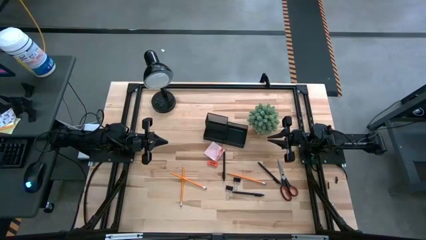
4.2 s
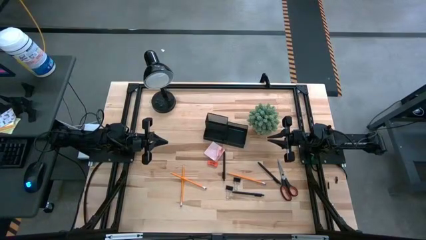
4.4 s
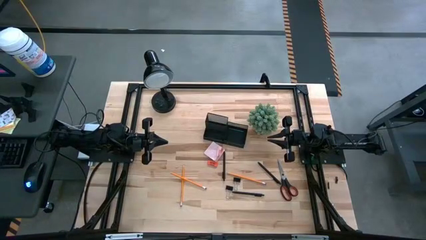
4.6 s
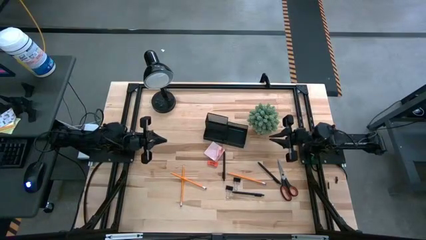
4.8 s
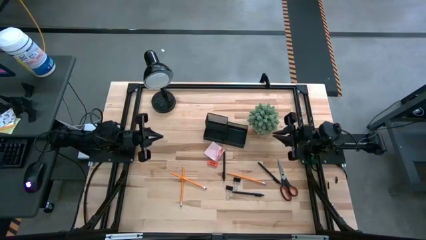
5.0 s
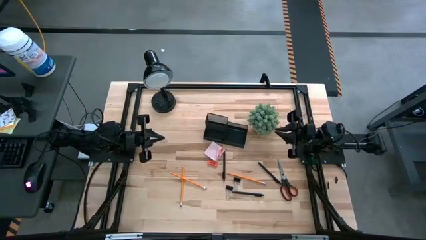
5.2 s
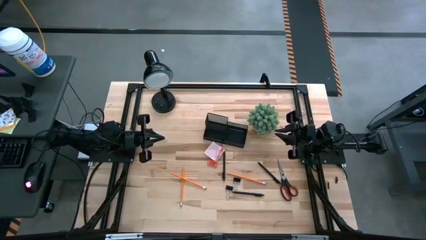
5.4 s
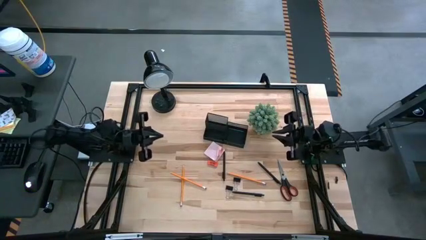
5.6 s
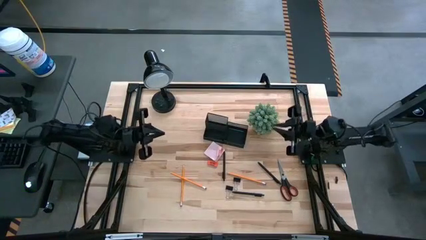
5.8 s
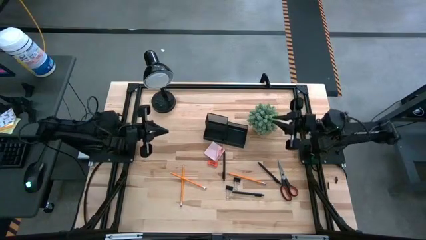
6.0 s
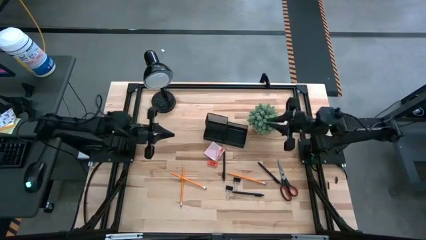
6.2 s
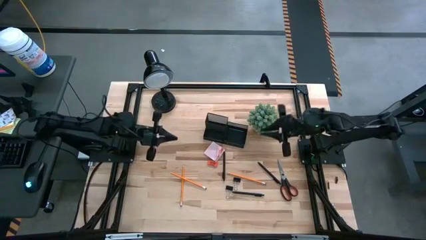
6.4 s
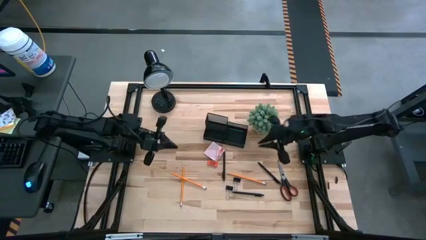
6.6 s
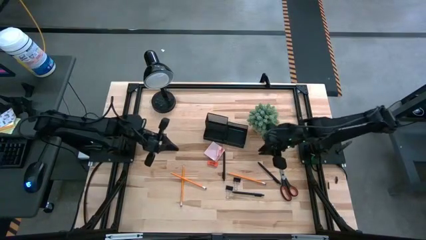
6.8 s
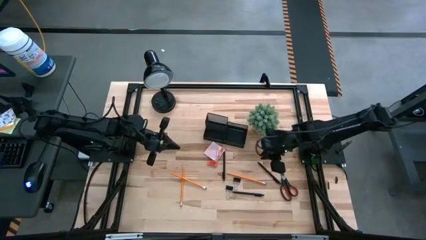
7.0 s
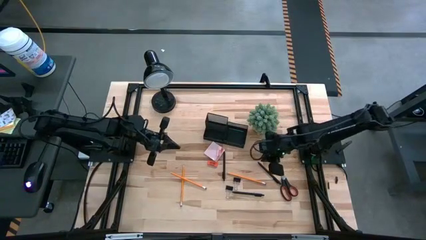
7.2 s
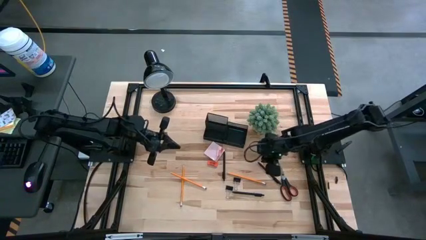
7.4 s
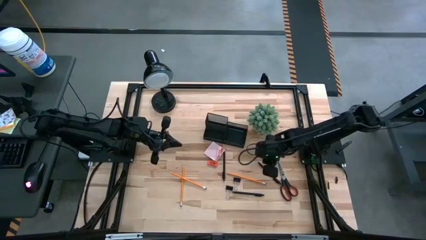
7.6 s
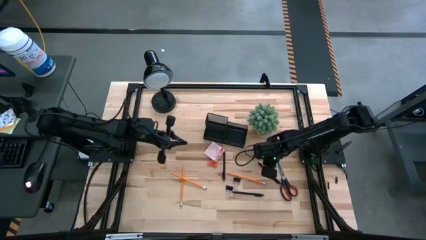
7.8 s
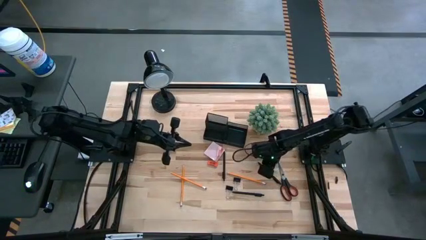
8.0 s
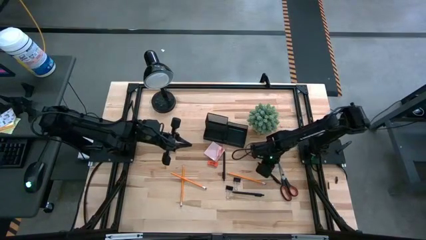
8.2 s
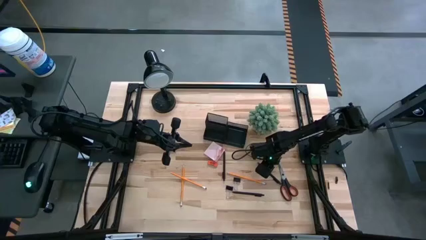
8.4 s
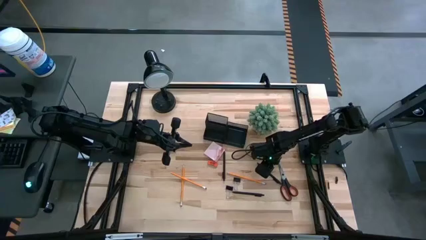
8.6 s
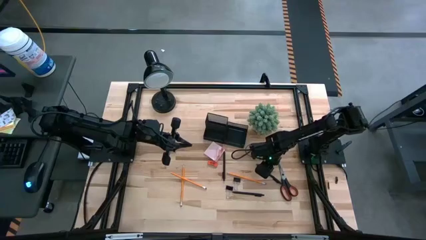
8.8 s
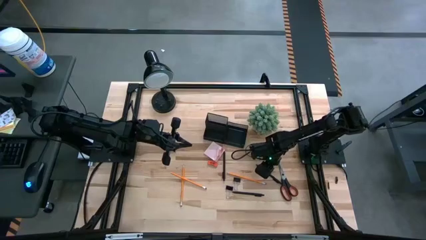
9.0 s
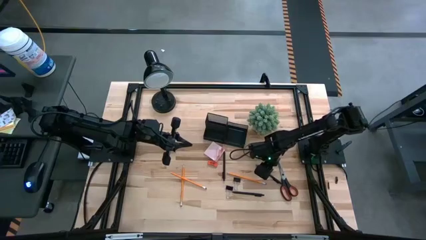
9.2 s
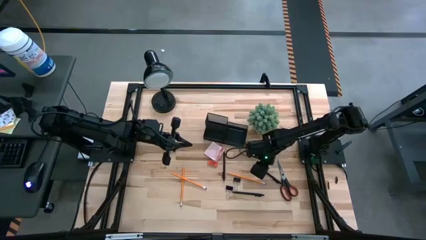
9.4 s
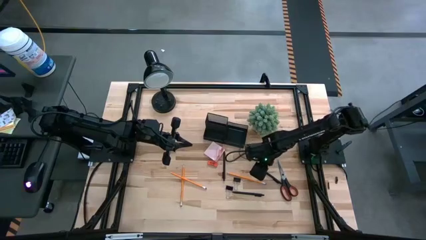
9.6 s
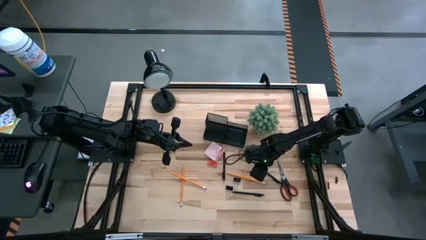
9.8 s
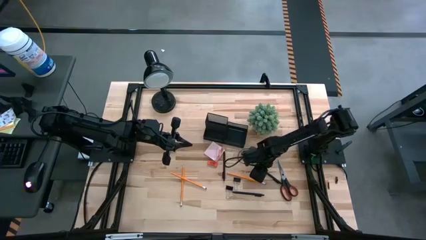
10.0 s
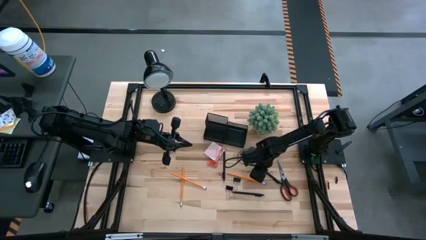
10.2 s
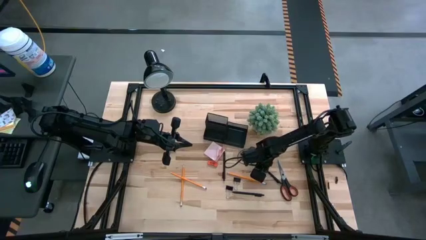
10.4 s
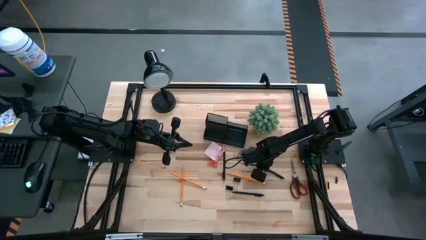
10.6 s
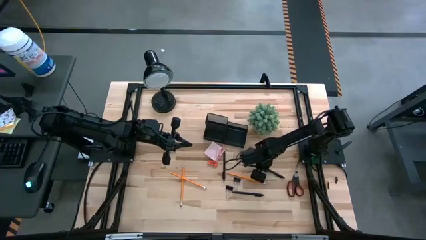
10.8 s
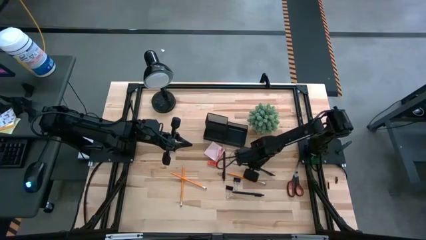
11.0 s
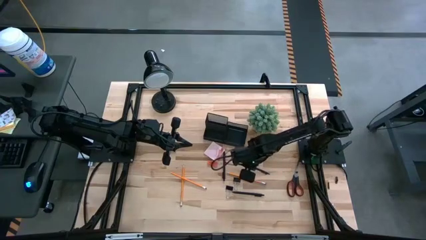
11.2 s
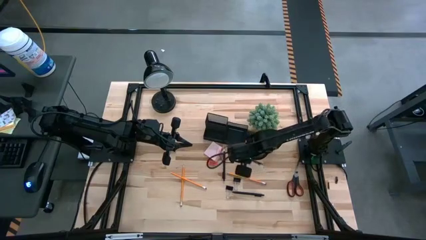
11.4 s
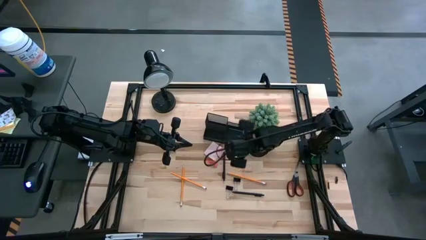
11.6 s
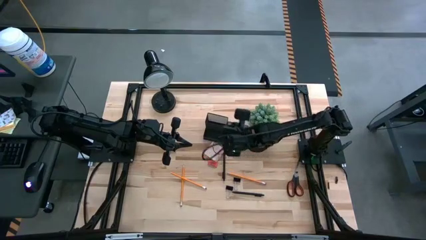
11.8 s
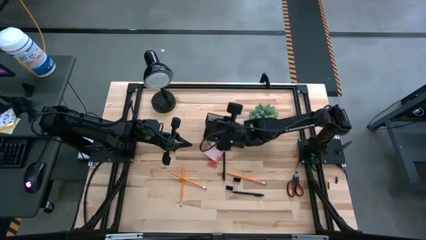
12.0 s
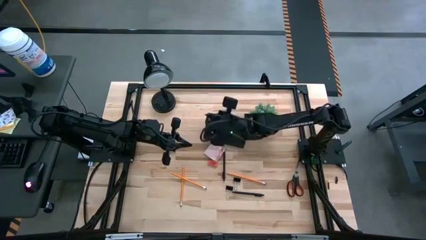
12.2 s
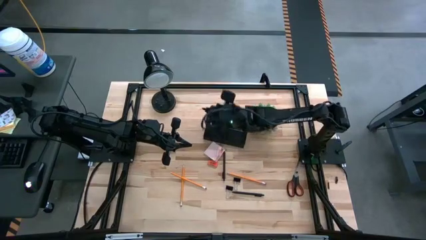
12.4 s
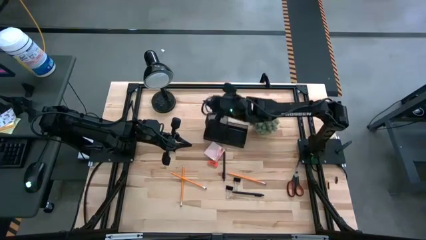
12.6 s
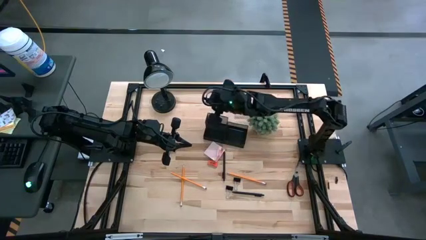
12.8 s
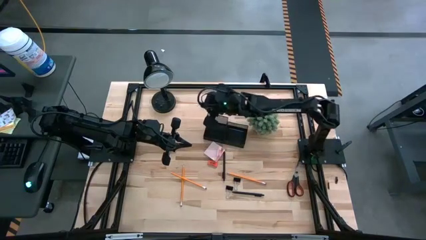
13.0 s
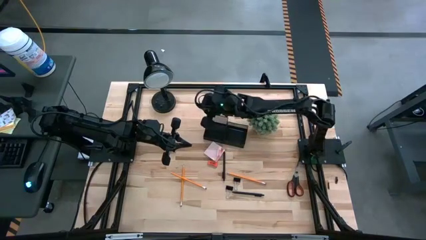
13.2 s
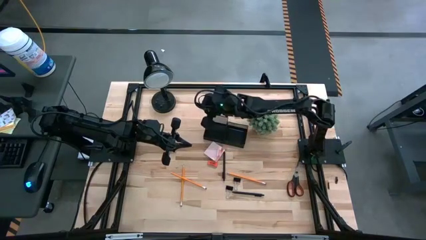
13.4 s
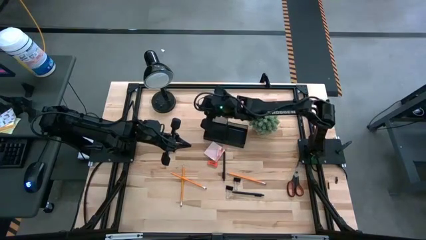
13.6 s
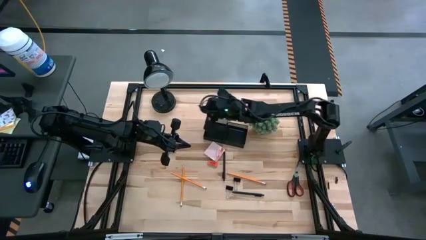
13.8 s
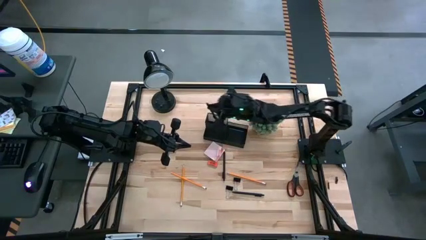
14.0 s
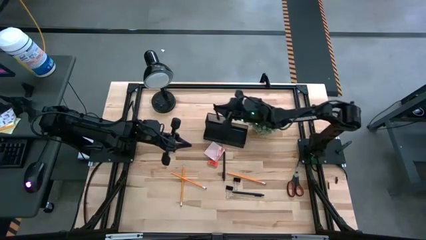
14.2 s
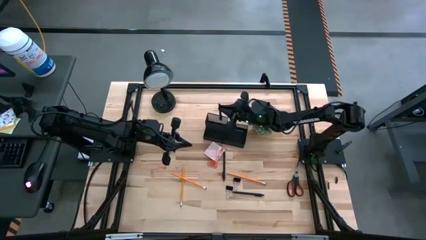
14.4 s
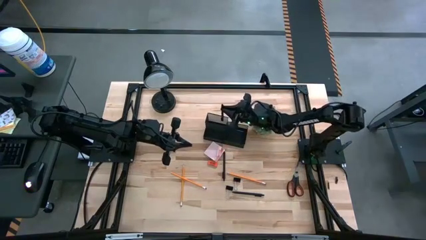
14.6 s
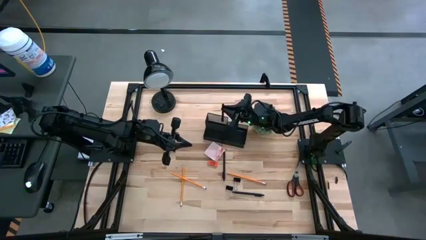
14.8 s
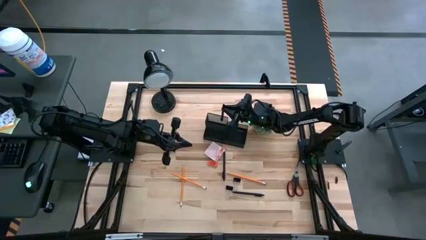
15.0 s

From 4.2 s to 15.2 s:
Task: Pick and place office supplies into organizer
Put the top right black pen into the black desk organizer
